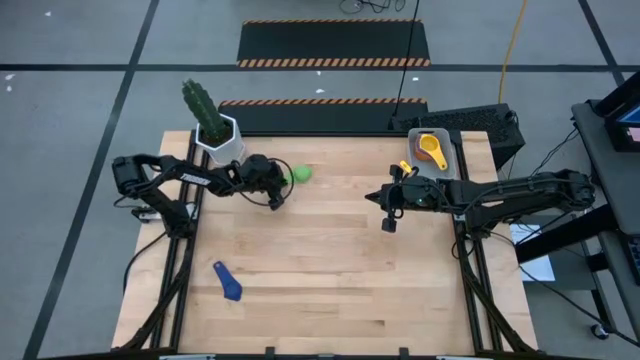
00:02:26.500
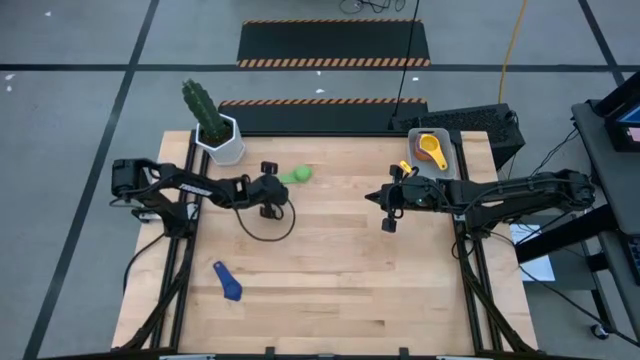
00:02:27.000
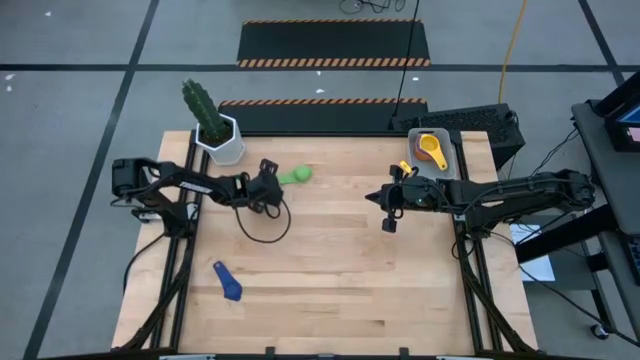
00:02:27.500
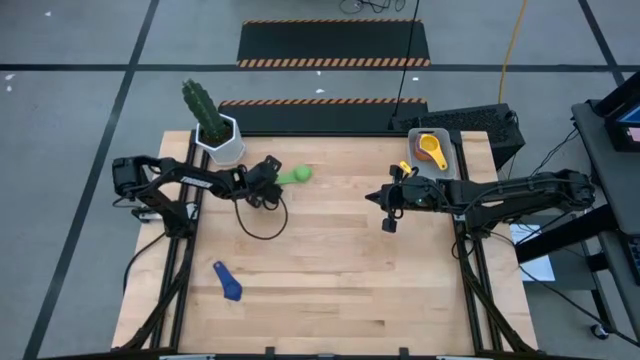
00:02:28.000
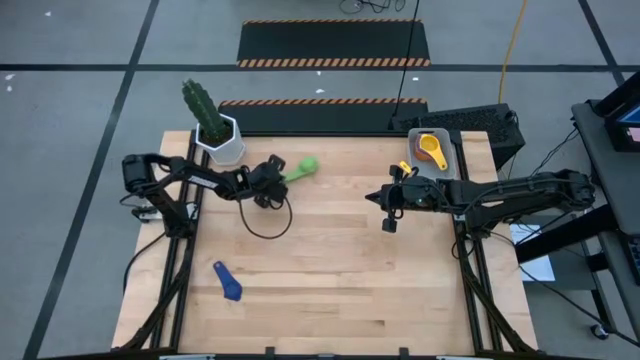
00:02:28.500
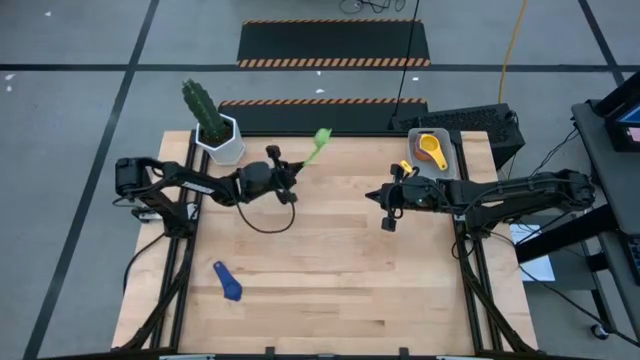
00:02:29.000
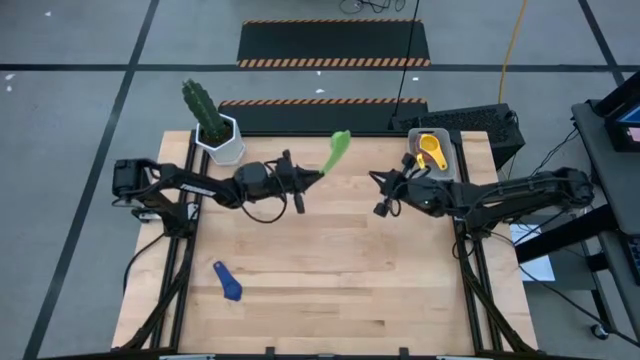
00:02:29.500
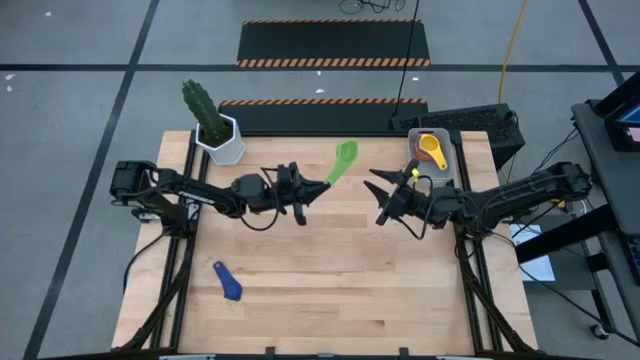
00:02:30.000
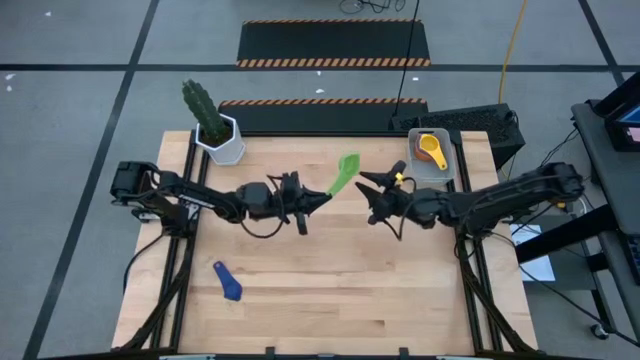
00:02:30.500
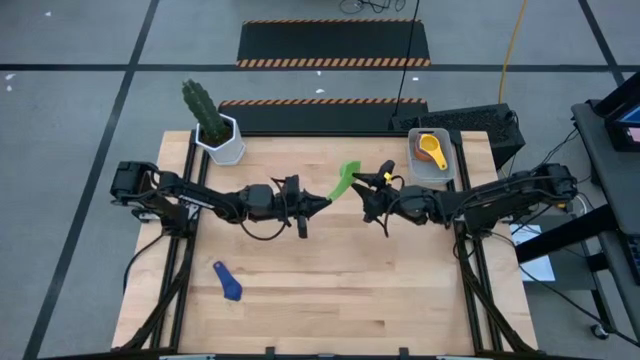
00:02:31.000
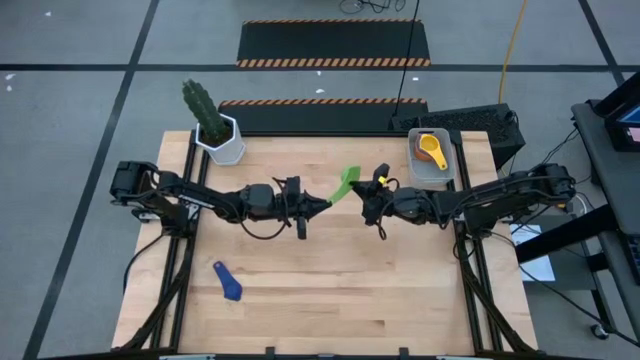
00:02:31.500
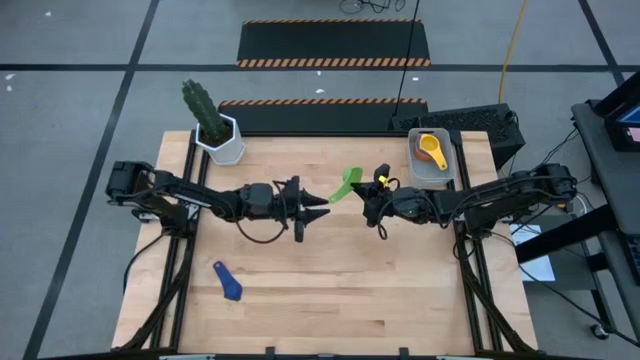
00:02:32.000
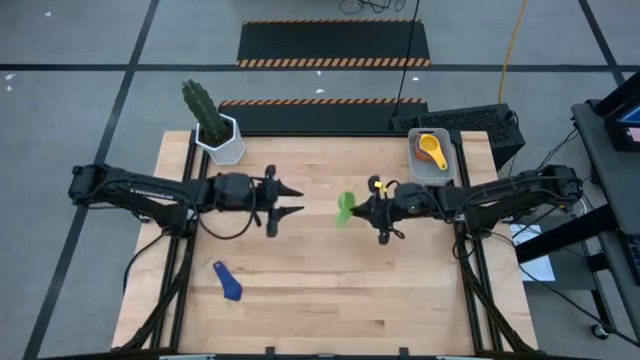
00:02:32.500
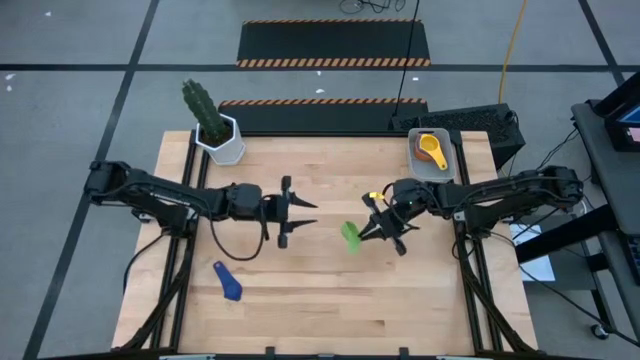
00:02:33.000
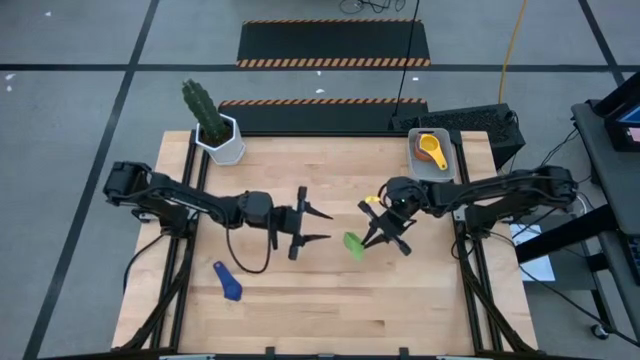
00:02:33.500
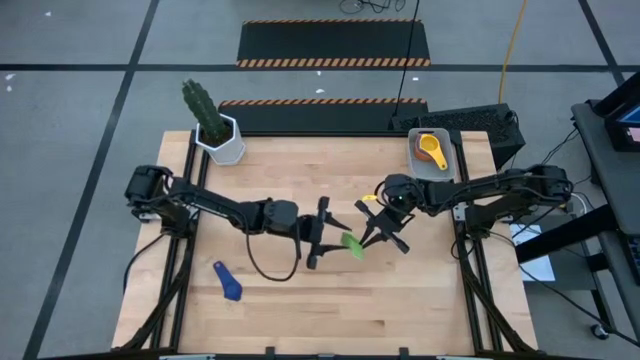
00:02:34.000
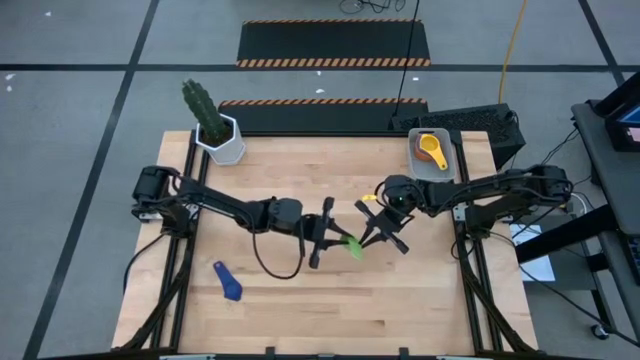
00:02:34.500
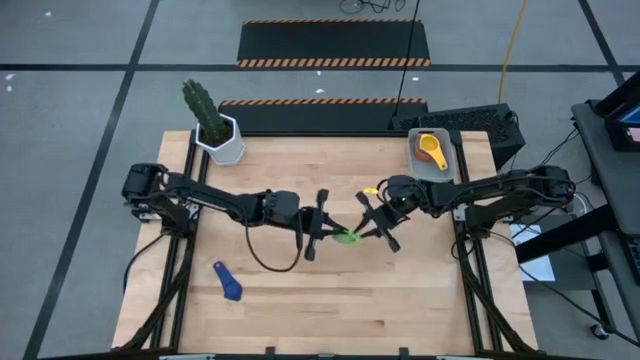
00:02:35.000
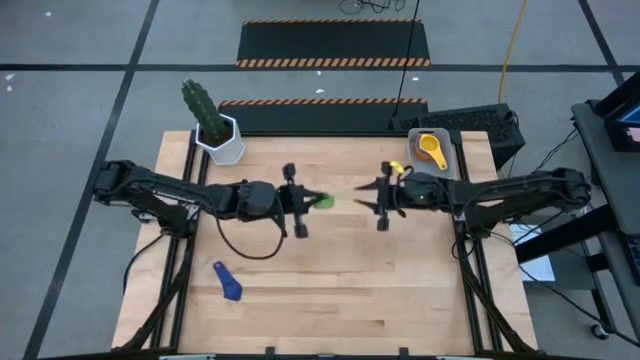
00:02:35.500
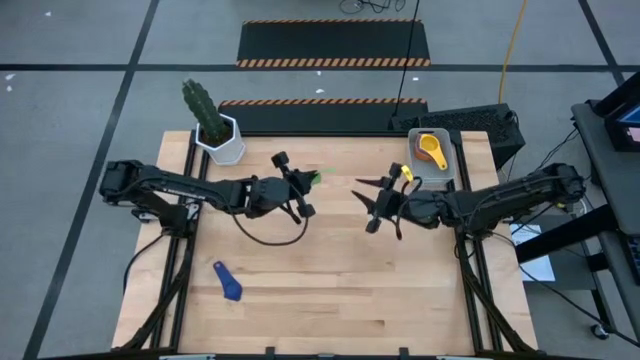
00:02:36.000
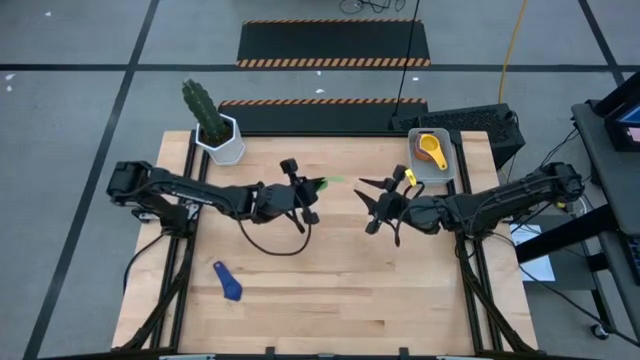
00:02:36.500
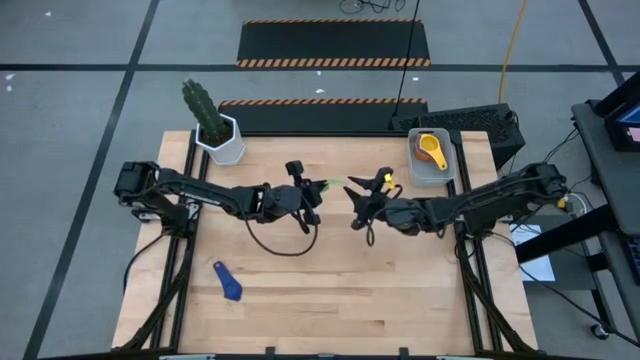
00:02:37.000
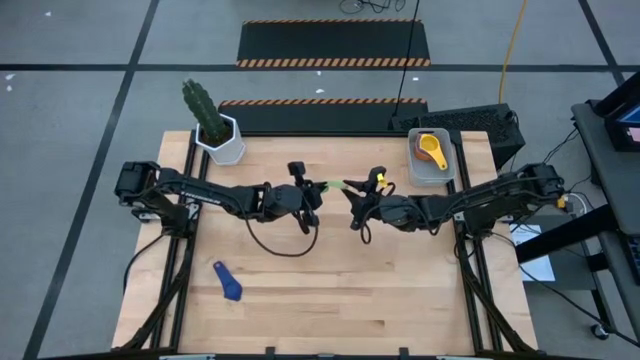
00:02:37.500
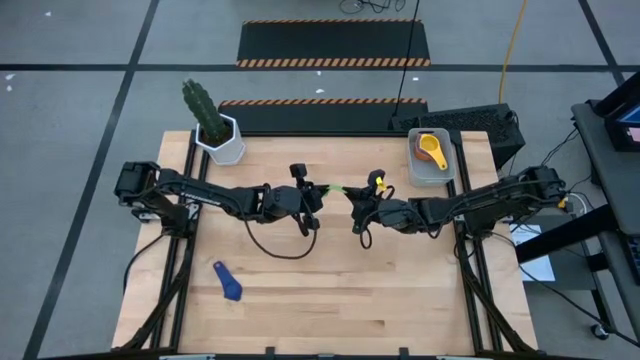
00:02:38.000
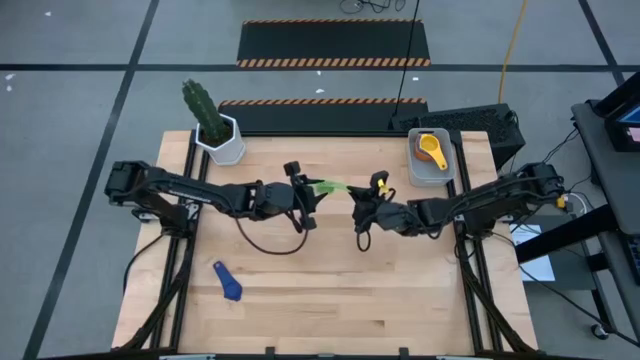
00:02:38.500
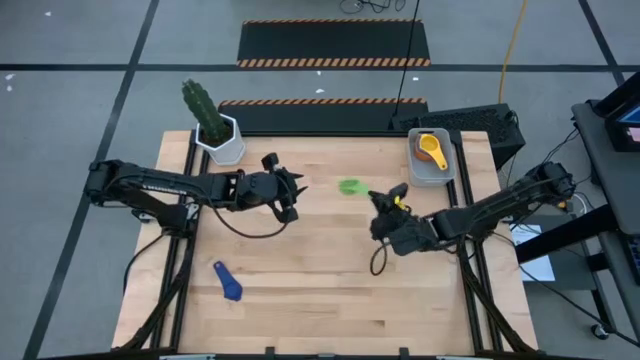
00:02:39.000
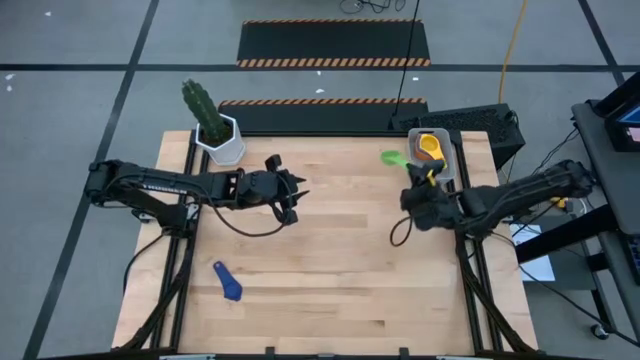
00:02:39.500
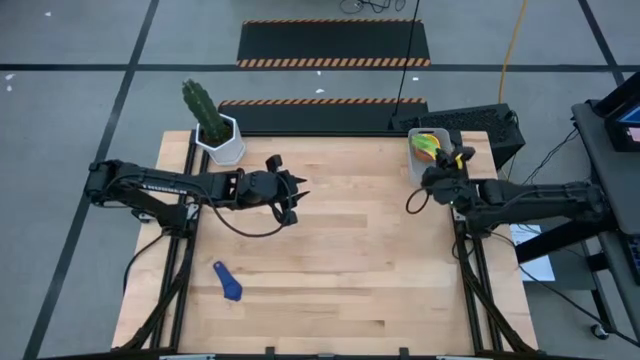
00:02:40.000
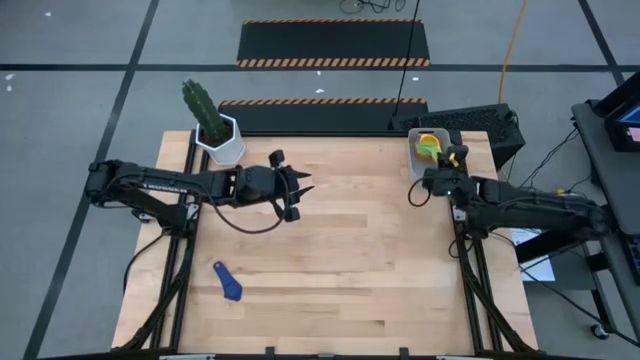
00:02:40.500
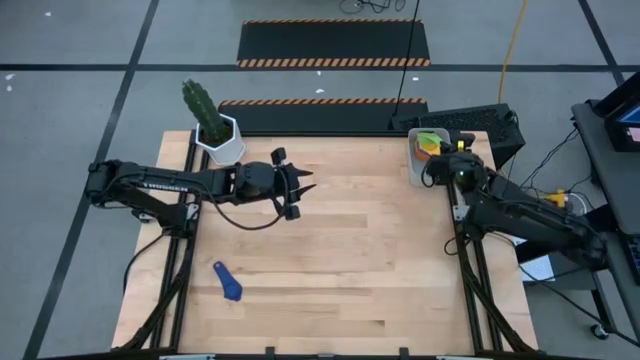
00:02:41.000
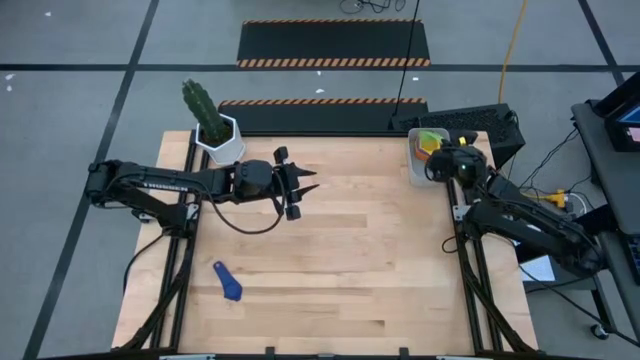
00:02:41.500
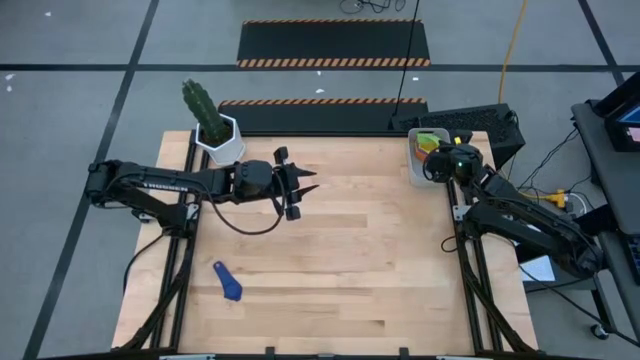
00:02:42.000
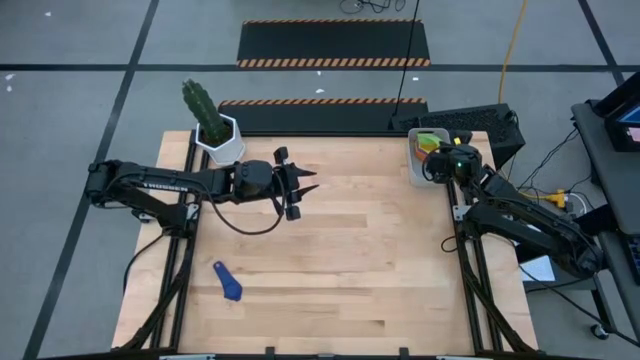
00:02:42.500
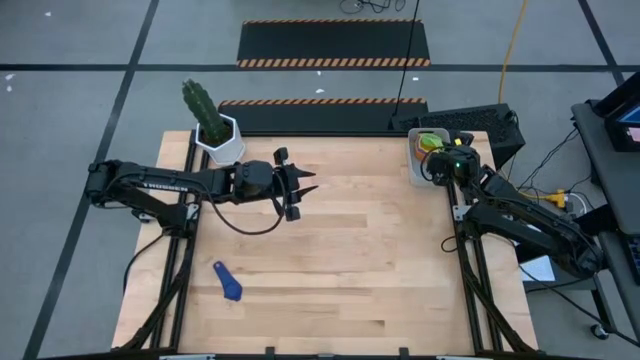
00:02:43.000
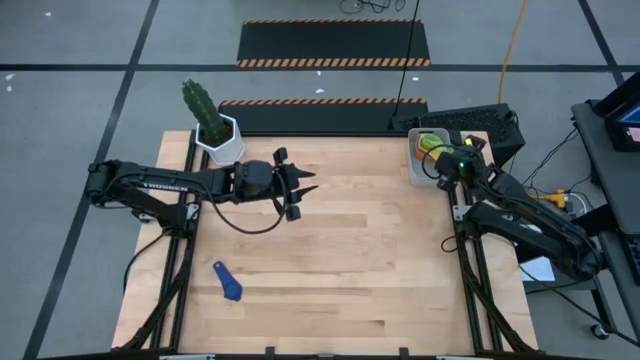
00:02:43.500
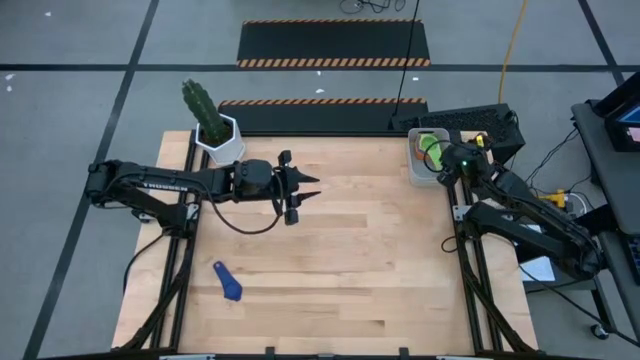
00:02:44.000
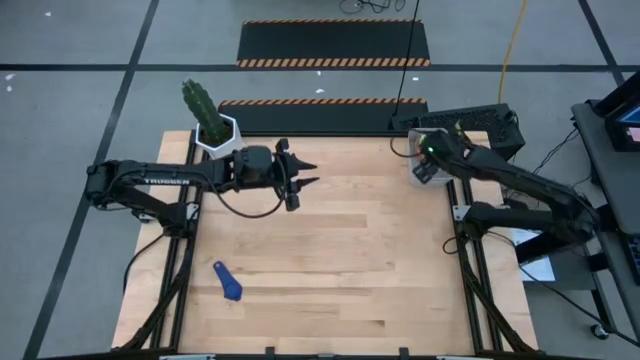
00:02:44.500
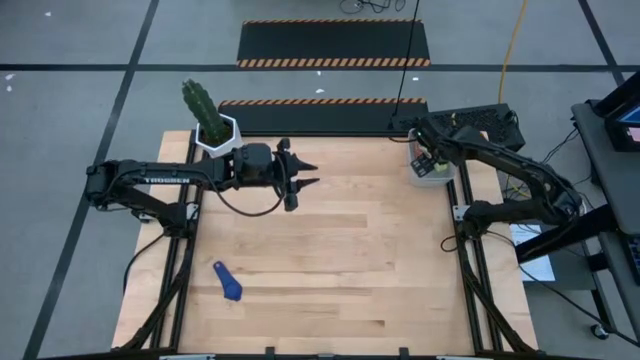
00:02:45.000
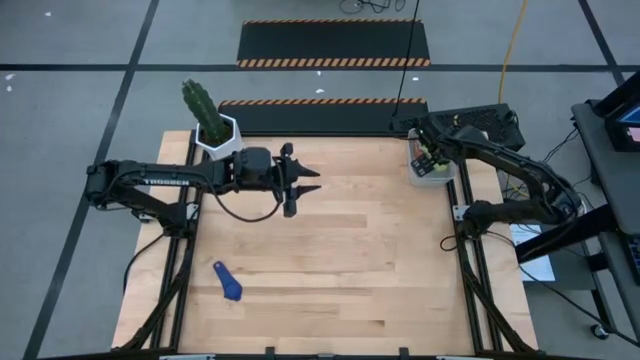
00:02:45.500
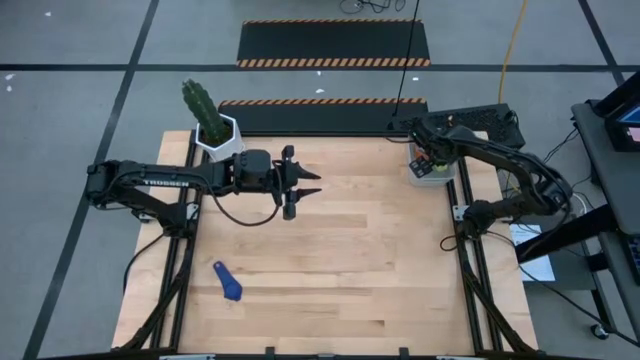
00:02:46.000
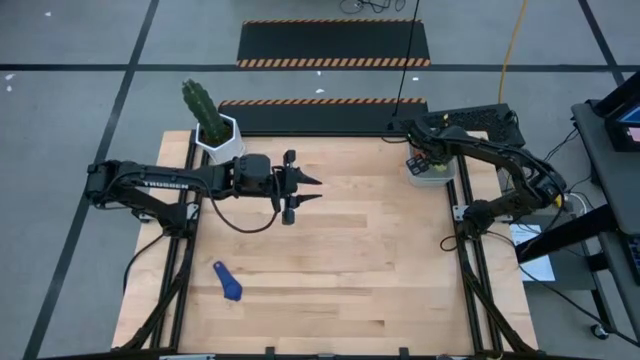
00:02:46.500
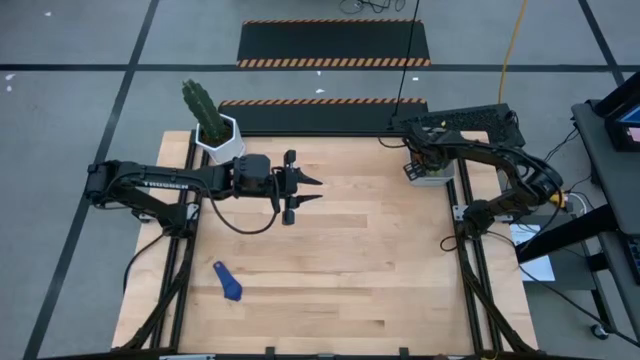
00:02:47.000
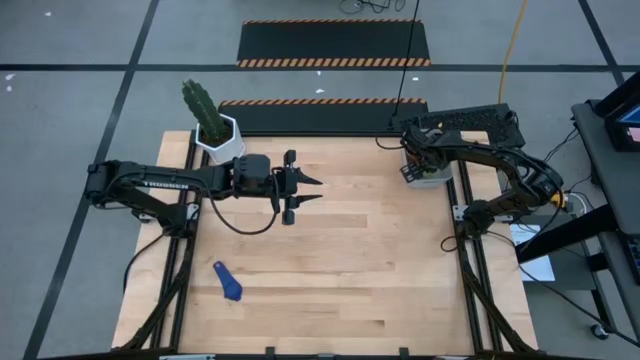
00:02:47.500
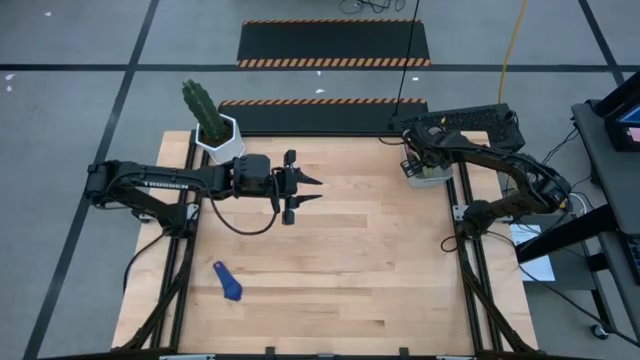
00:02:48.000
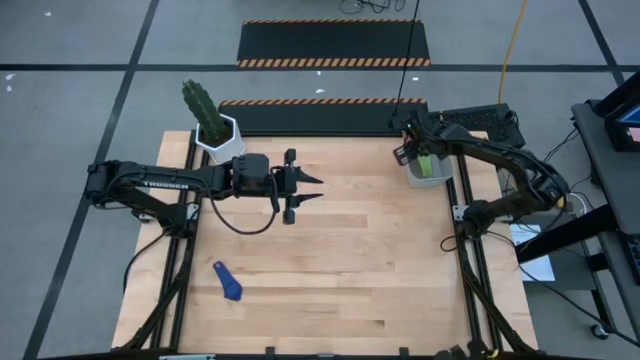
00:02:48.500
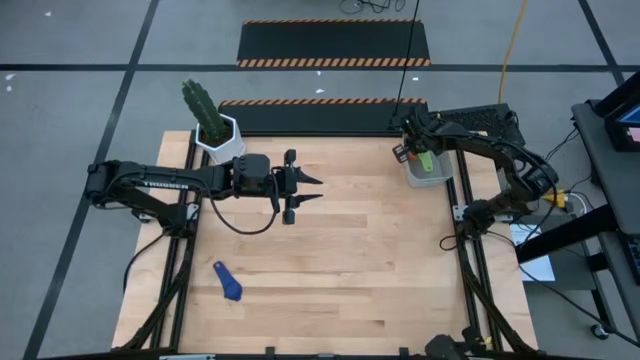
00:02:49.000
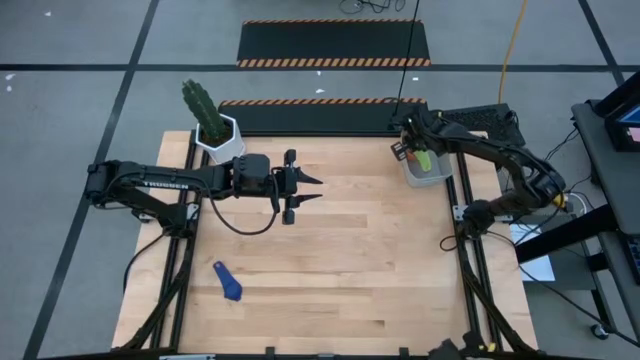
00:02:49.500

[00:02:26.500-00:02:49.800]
Task: Nest measuring cups in basket
Stack the green measuring cup on top of the yellow measuring cup in the gray bin
